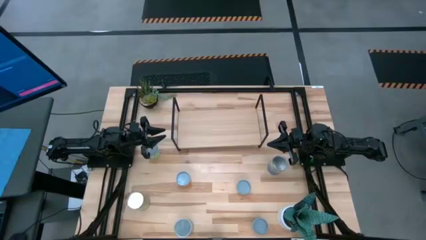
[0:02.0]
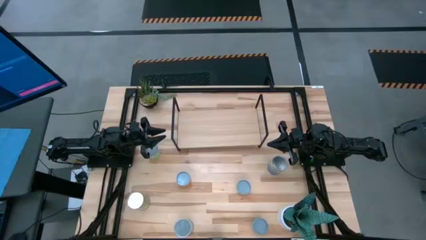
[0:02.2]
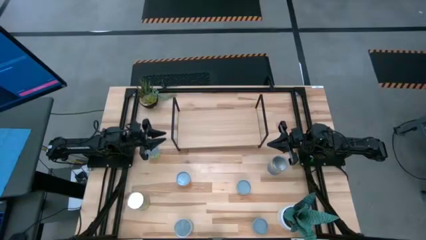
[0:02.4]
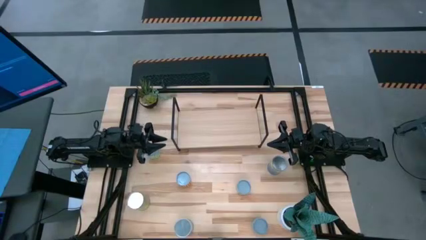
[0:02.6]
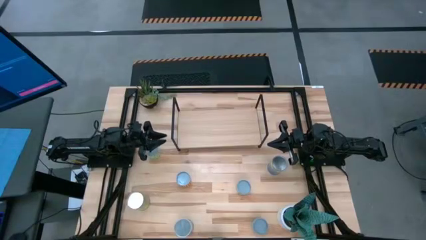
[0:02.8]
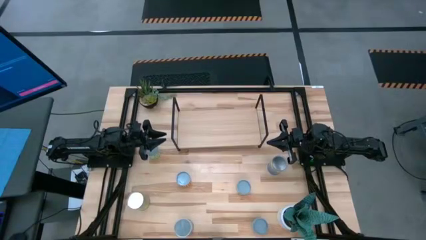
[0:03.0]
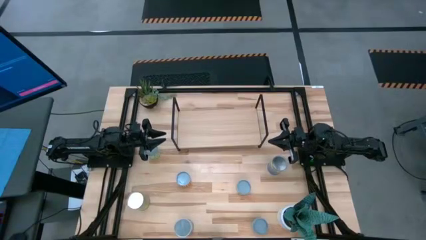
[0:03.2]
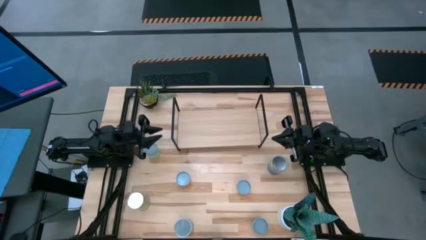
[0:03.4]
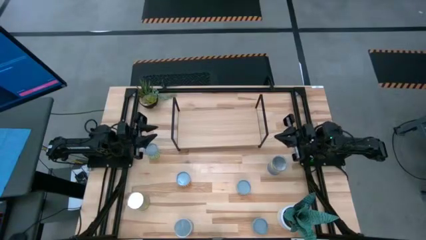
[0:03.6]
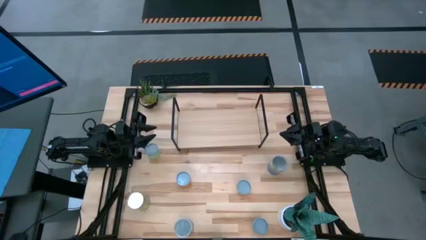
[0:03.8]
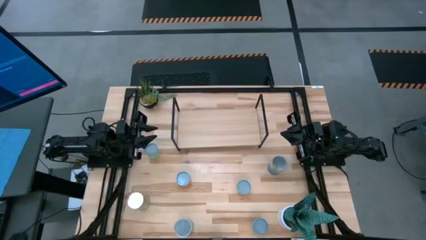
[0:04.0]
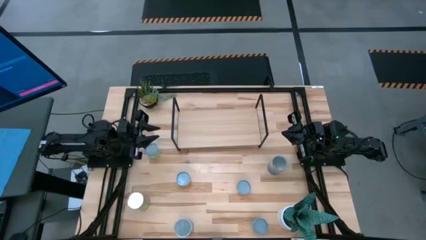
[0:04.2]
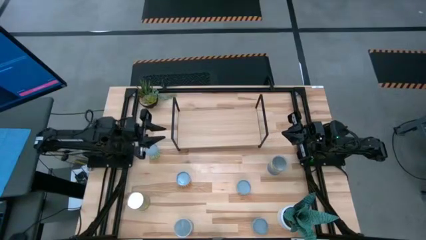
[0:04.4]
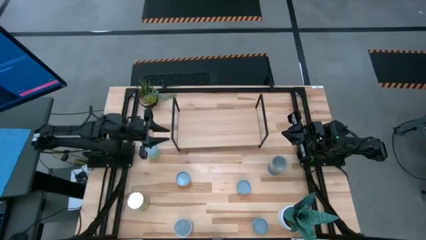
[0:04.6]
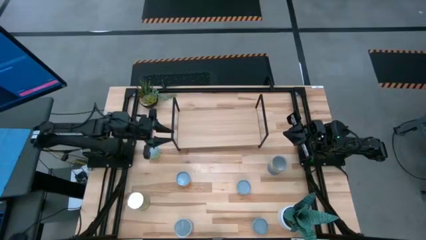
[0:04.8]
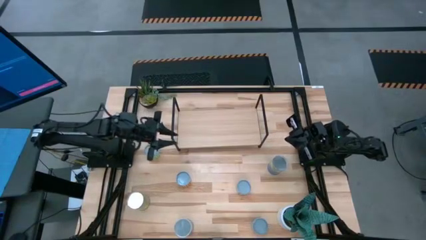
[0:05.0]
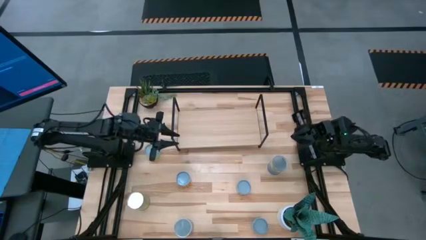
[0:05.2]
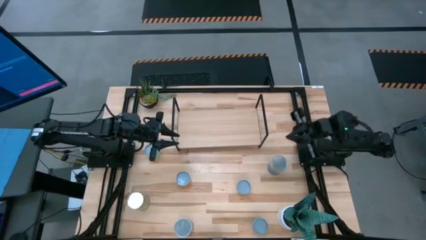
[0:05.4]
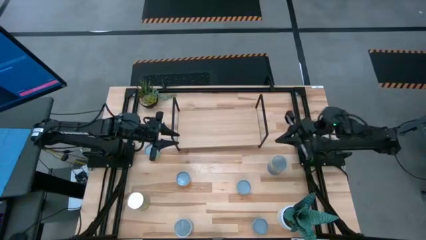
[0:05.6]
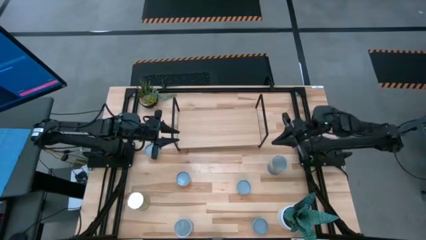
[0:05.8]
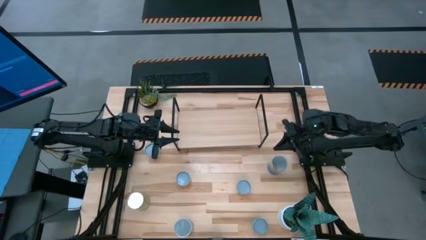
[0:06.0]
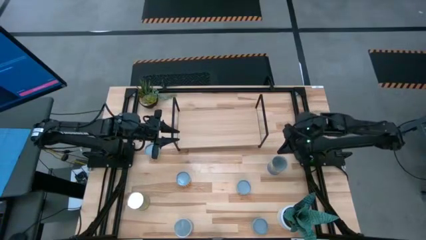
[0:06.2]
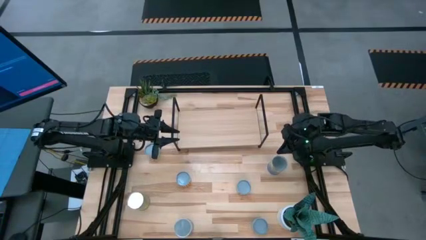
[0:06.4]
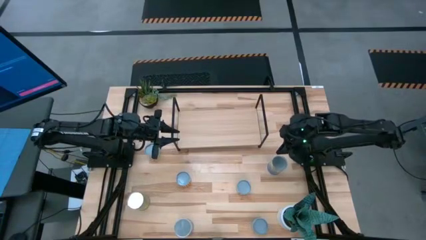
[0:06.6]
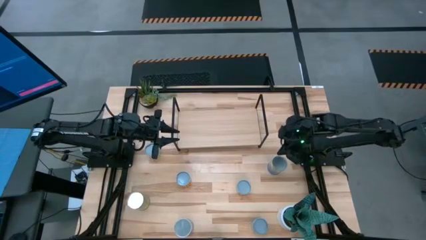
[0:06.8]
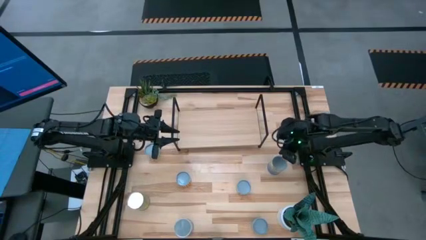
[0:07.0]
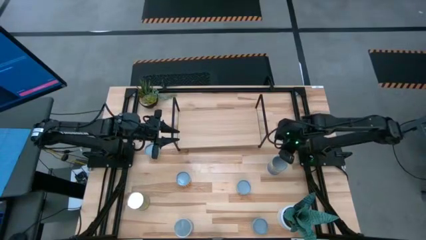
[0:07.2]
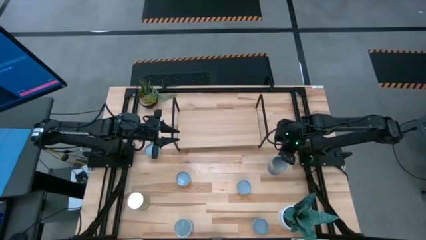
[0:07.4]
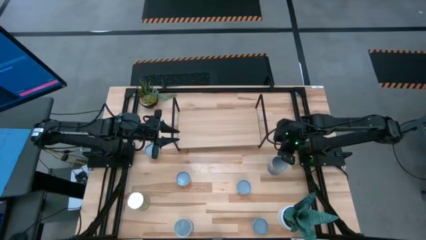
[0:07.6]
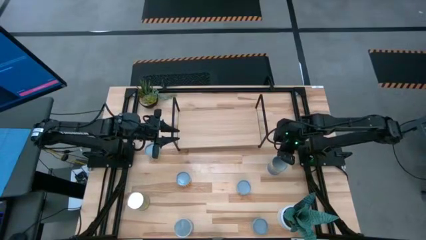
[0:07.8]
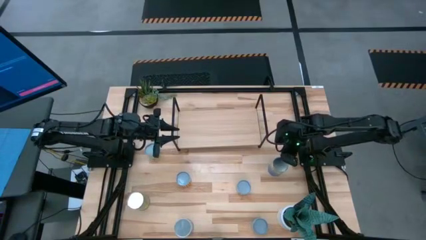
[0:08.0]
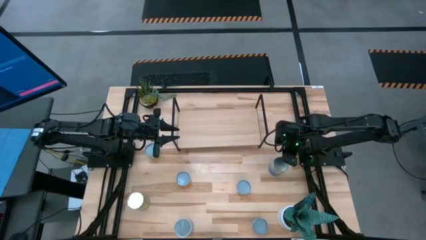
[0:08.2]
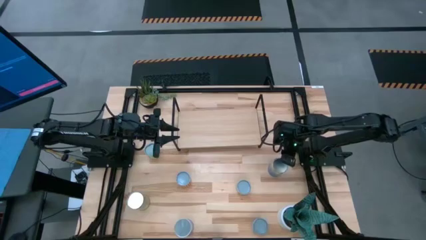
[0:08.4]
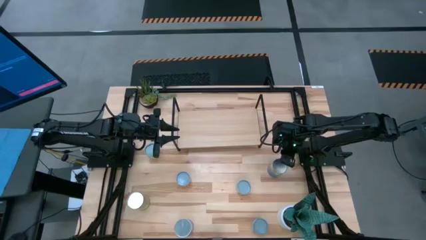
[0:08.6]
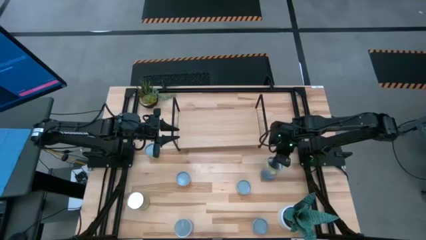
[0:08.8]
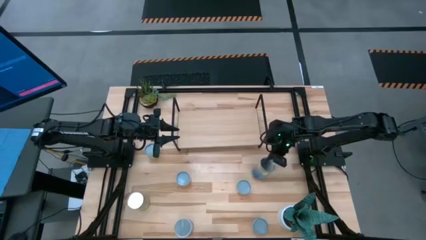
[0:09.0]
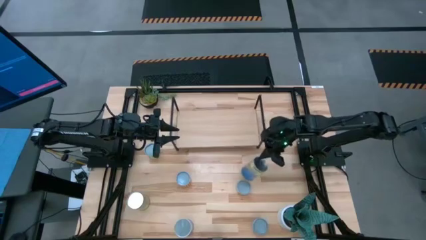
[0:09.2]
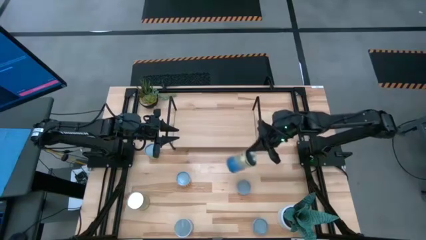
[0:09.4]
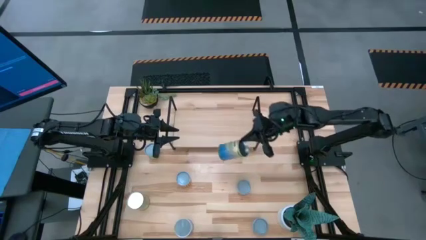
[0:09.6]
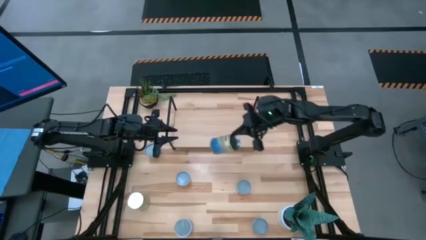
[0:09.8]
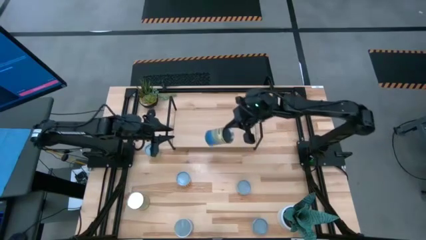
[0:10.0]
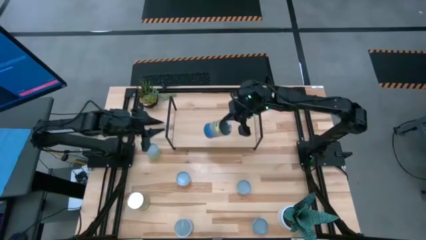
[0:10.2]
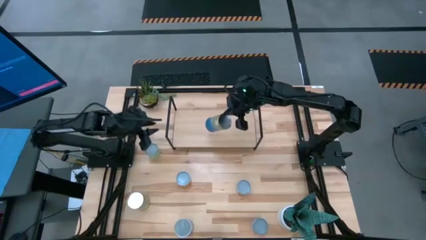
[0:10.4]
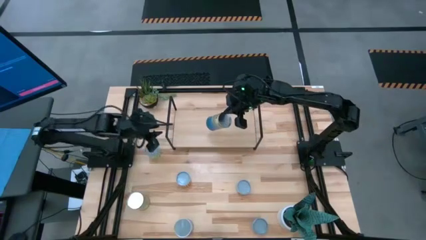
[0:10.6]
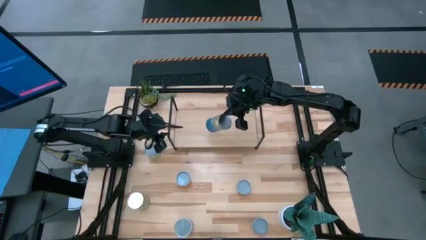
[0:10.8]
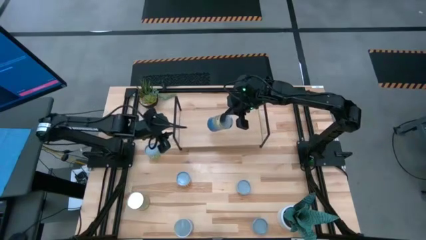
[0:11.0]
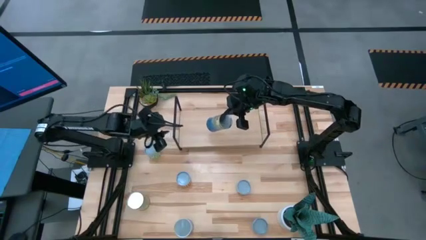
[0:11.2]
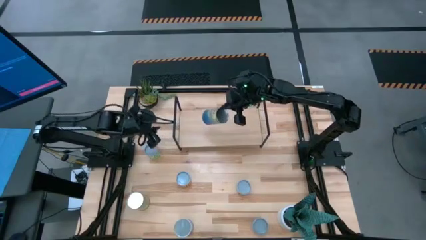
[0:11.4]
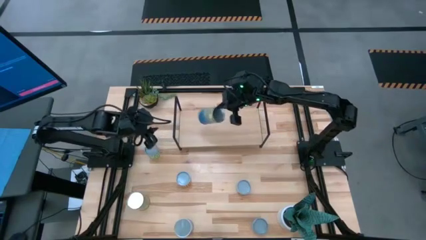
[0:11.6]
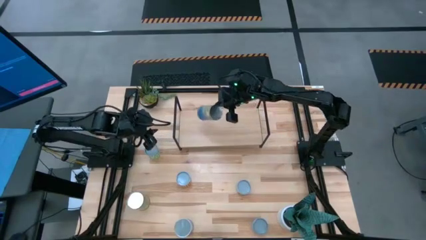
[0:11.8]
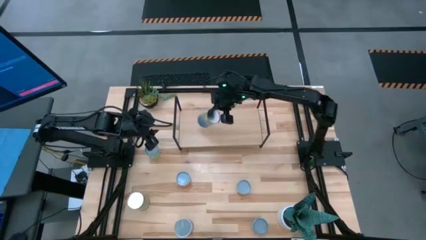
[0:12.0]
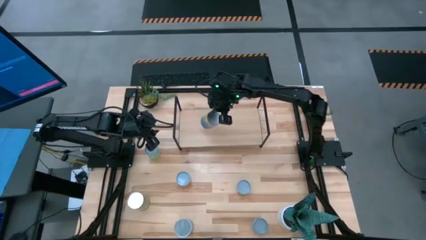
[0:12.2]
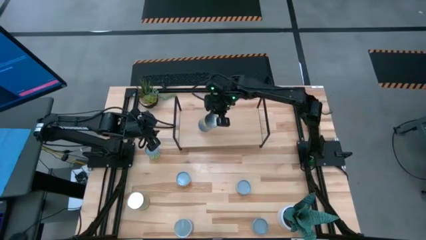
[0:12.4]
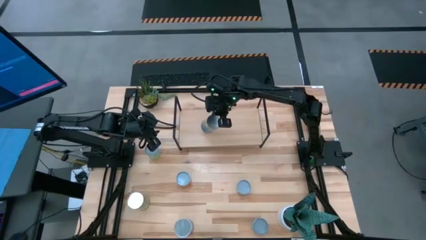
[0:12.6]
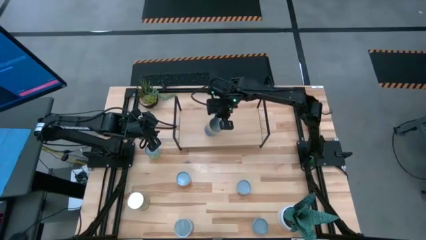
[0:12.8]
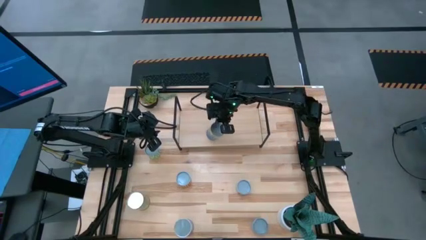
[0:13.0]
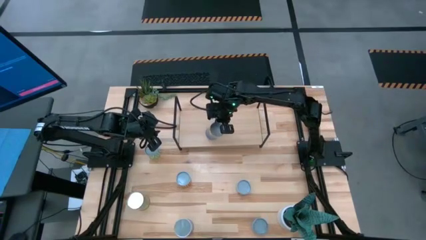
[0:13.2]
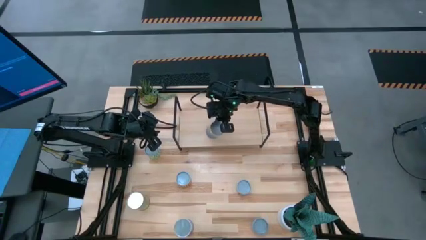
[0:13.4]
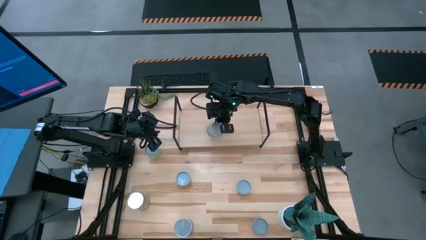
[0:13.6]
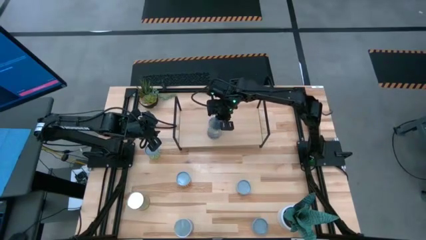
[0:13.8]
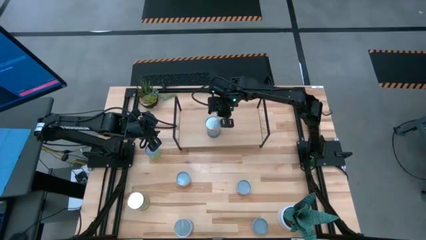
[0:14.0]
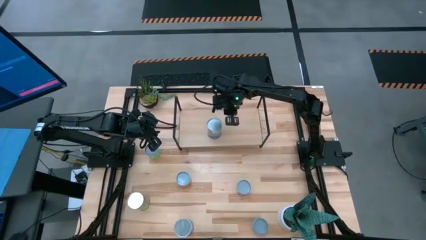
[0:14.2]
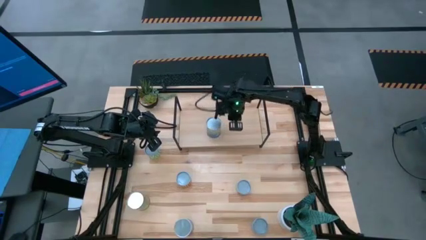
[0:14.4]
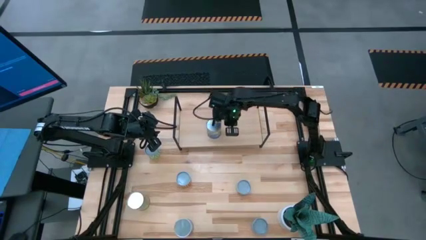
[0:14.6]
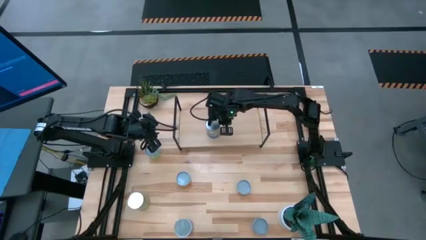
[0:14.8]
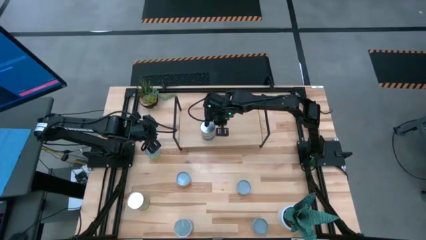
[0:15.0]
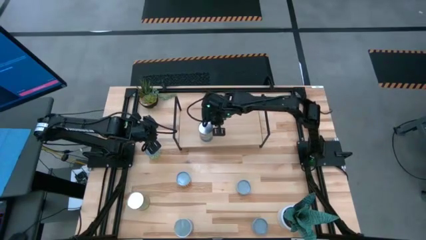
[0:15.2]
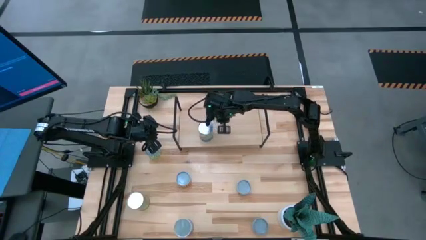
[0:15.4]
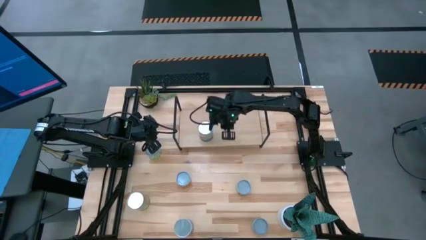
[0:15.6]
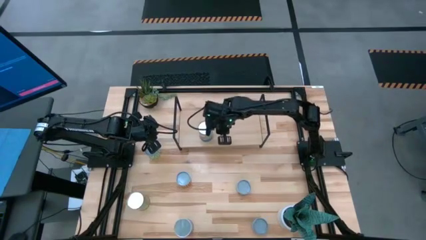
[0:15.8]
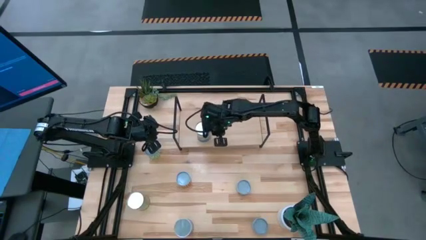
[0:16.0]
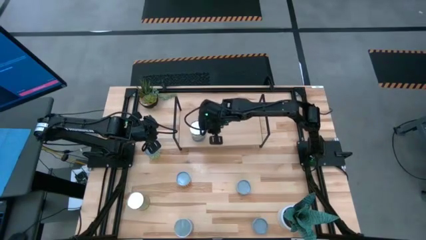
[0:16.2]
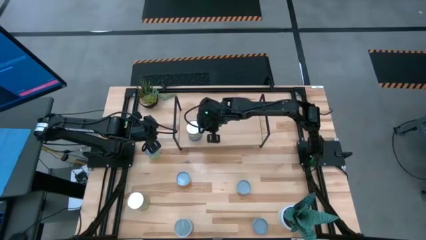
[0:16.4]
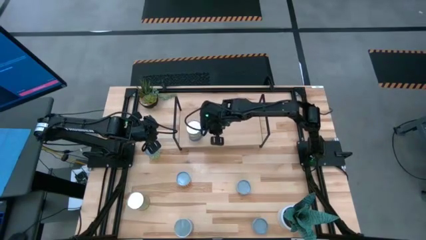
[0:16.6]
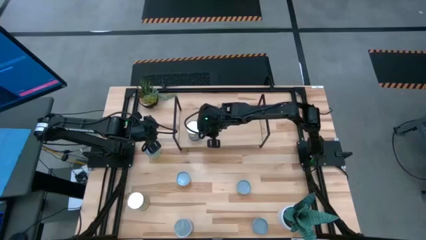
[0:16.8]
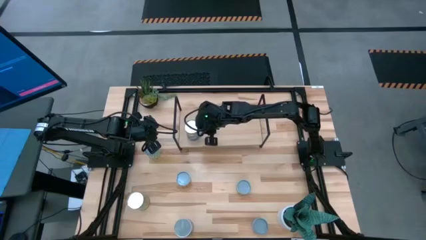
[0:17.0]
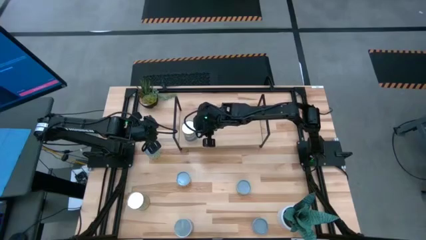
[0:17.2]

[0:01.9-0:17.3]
Task: Pick and place cans onto a shelf
Put the canned peas on the shelf
